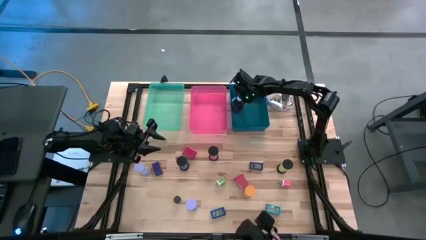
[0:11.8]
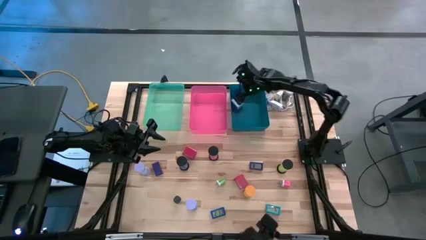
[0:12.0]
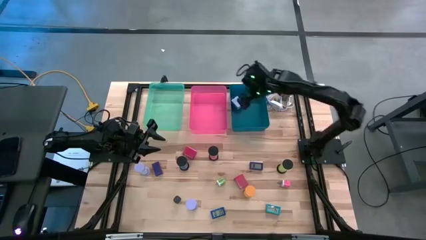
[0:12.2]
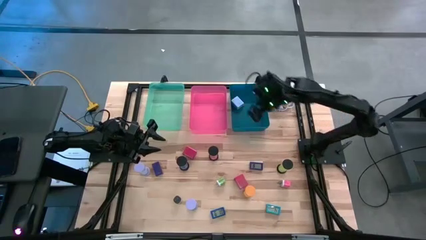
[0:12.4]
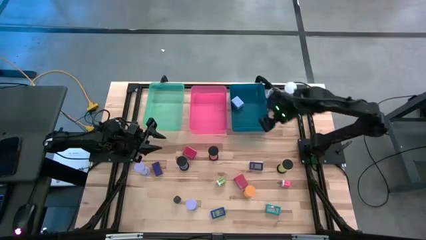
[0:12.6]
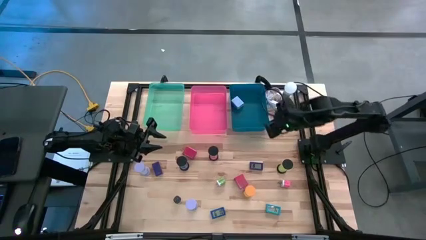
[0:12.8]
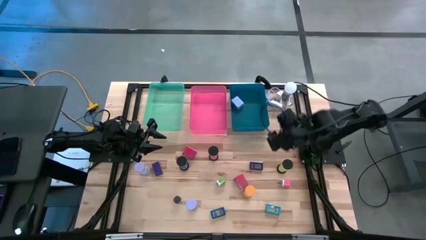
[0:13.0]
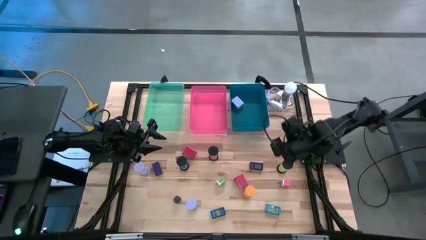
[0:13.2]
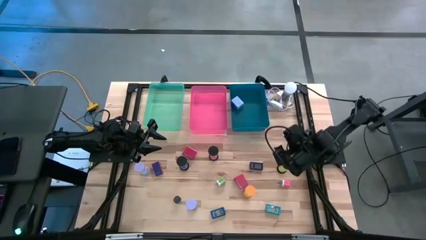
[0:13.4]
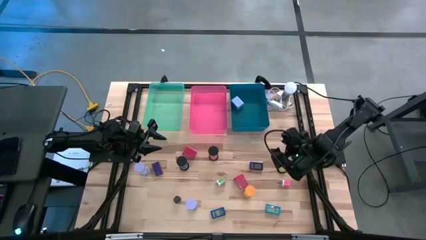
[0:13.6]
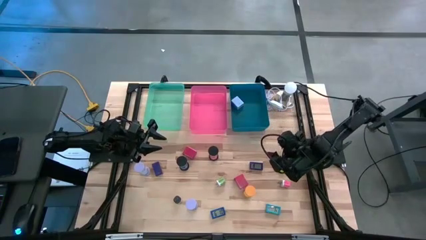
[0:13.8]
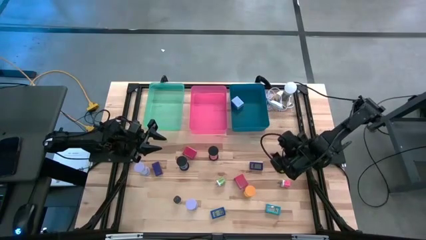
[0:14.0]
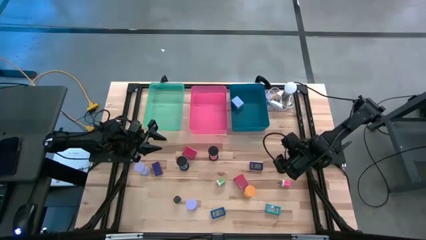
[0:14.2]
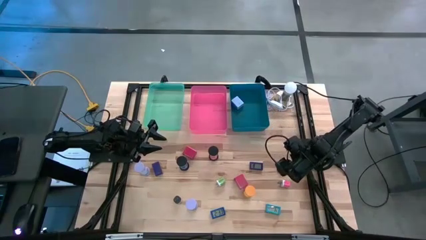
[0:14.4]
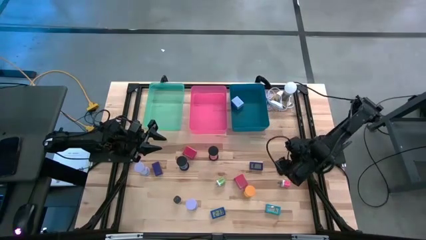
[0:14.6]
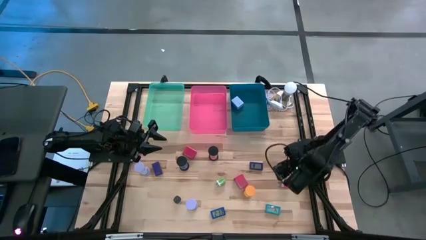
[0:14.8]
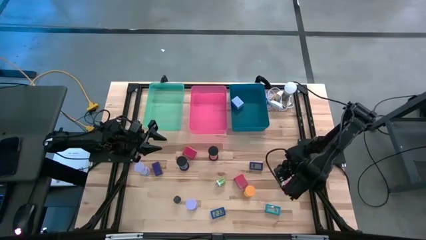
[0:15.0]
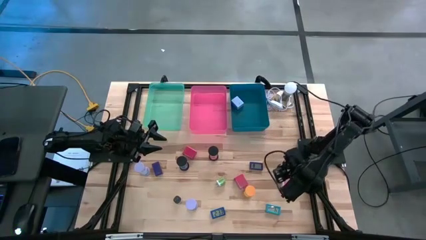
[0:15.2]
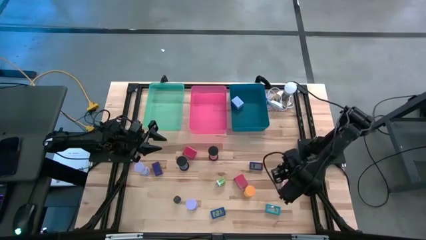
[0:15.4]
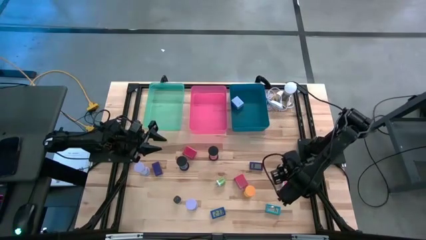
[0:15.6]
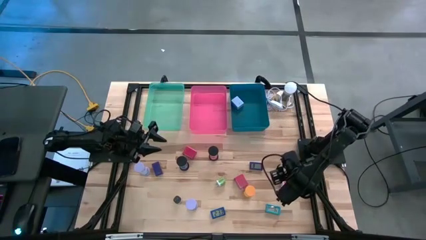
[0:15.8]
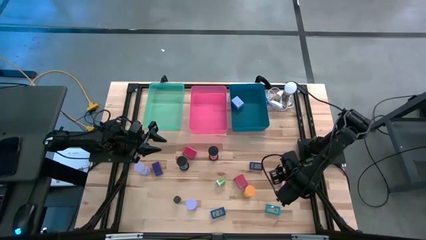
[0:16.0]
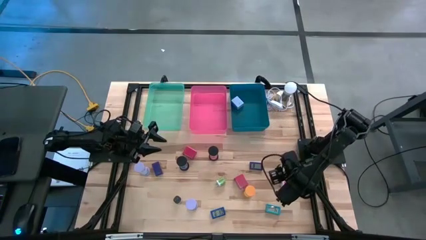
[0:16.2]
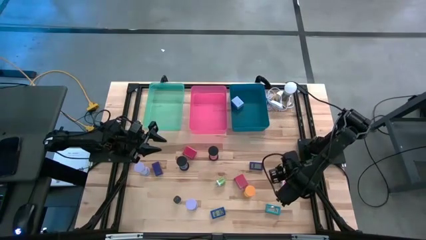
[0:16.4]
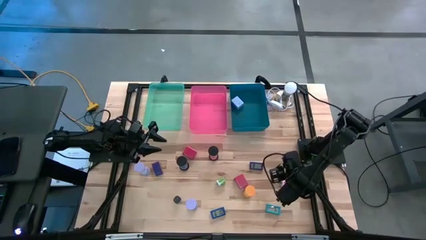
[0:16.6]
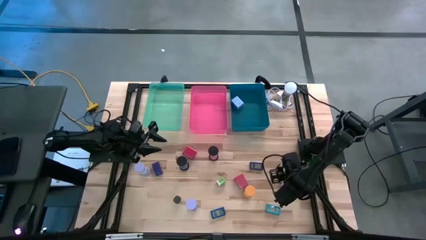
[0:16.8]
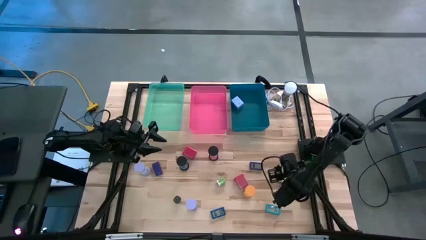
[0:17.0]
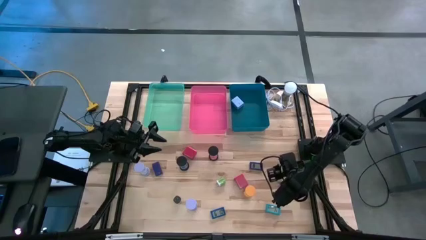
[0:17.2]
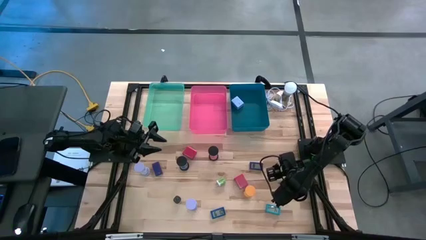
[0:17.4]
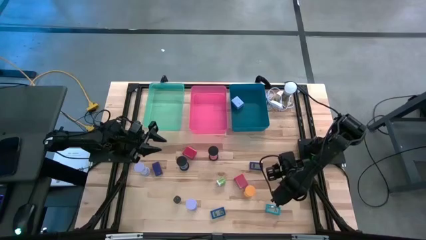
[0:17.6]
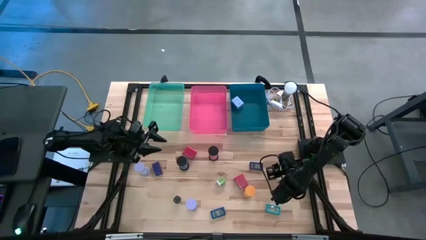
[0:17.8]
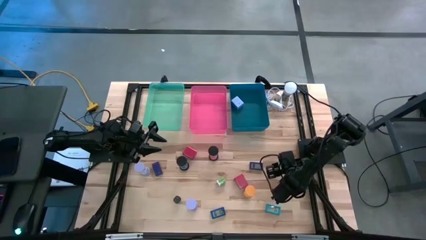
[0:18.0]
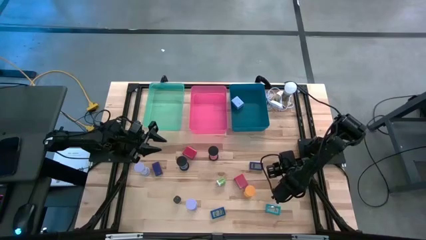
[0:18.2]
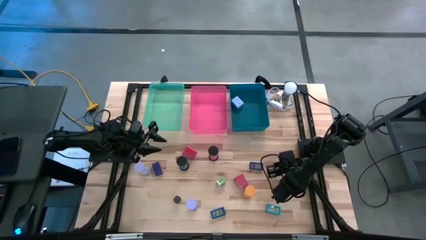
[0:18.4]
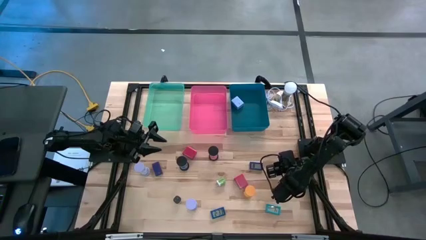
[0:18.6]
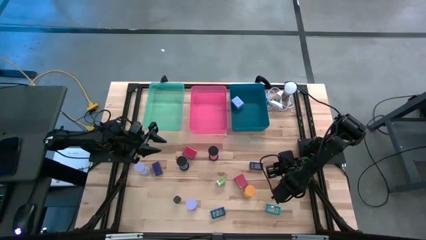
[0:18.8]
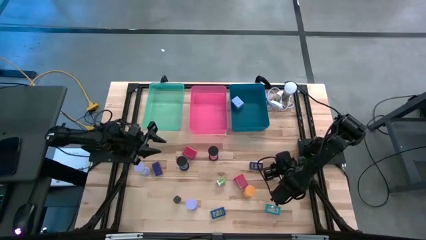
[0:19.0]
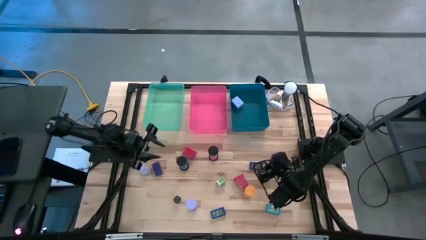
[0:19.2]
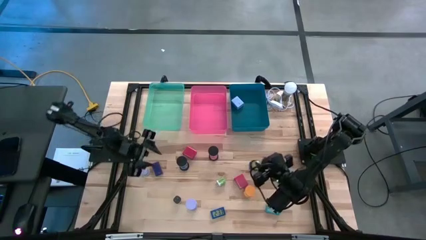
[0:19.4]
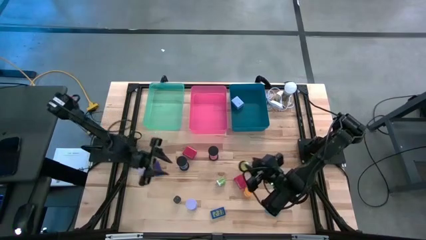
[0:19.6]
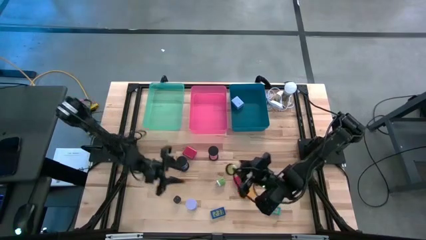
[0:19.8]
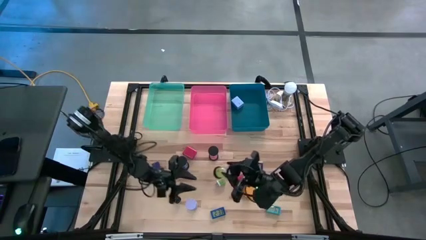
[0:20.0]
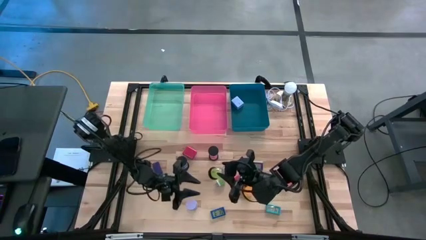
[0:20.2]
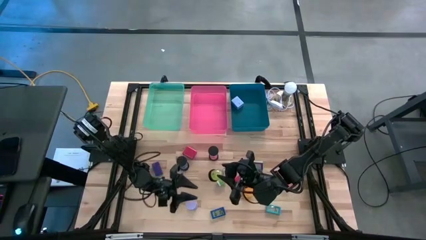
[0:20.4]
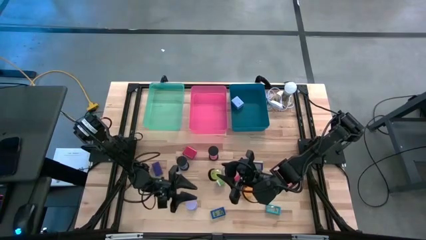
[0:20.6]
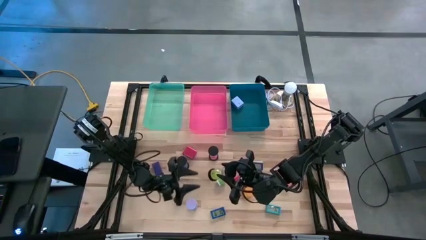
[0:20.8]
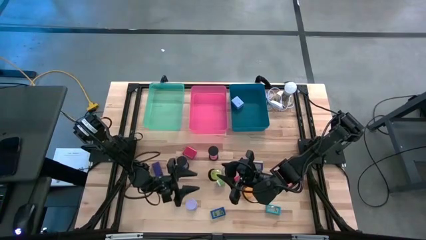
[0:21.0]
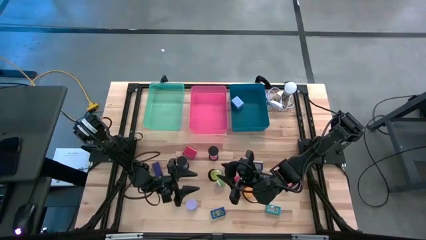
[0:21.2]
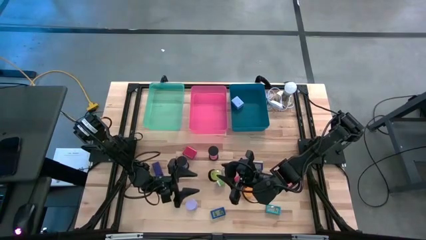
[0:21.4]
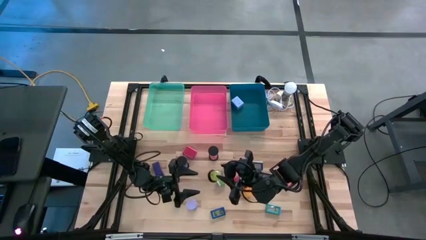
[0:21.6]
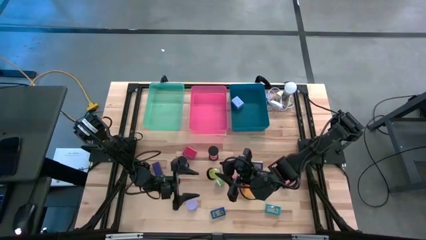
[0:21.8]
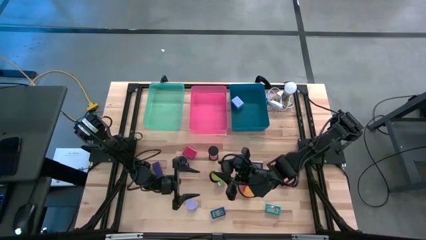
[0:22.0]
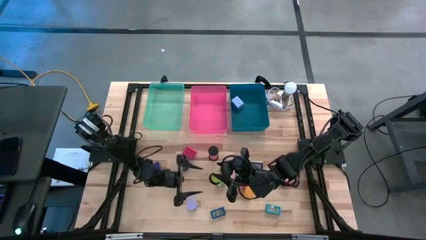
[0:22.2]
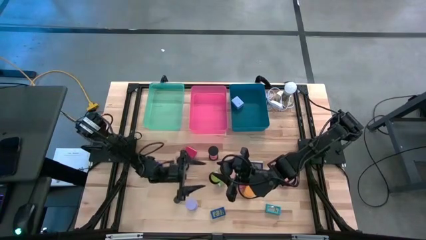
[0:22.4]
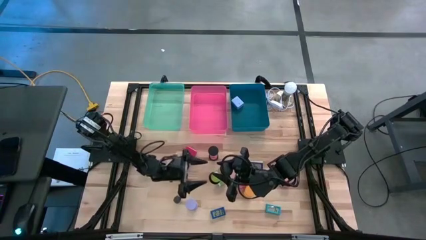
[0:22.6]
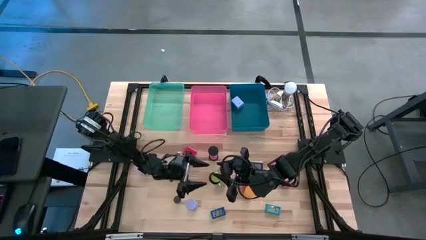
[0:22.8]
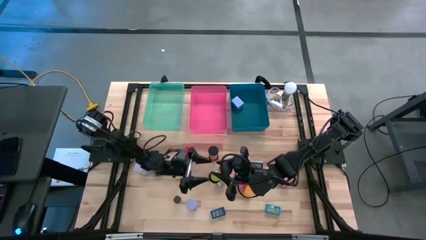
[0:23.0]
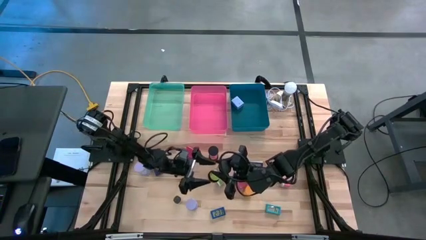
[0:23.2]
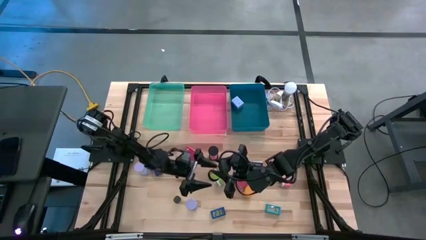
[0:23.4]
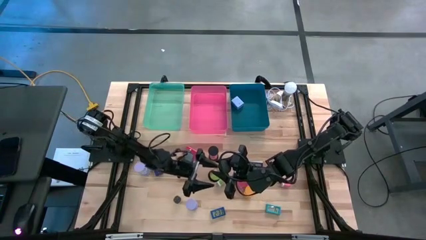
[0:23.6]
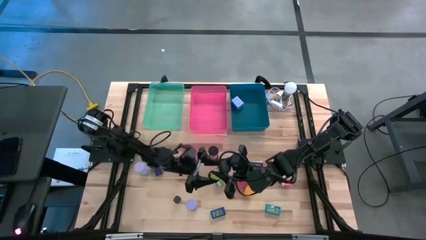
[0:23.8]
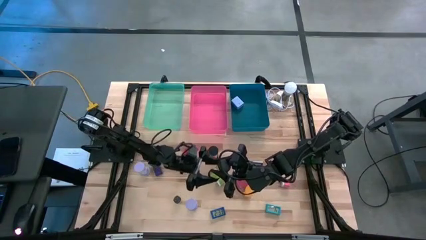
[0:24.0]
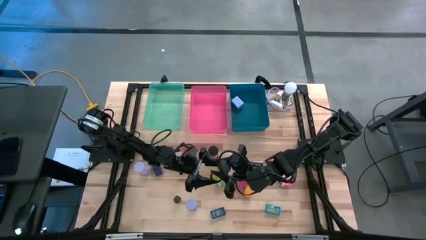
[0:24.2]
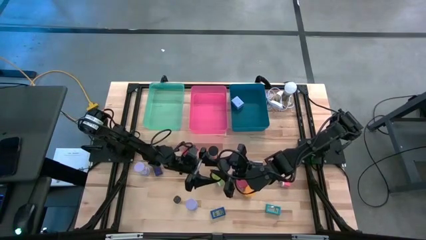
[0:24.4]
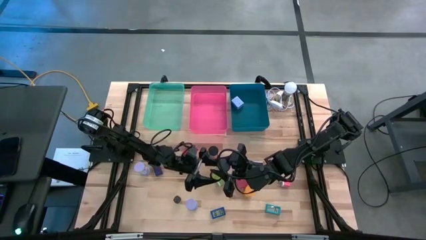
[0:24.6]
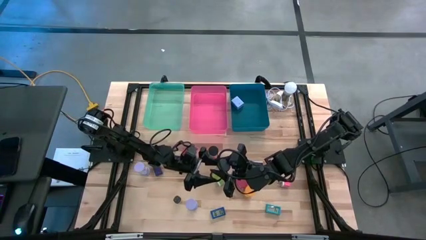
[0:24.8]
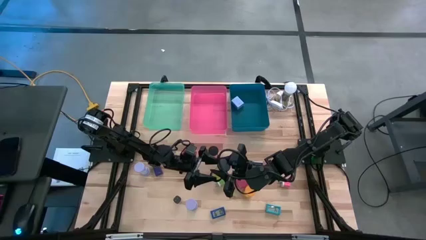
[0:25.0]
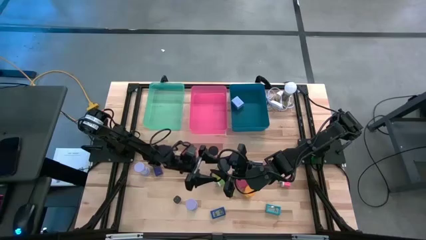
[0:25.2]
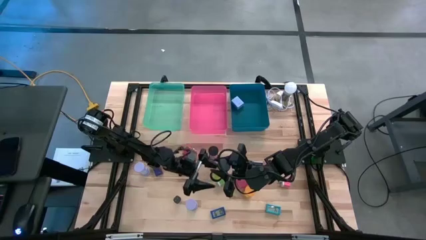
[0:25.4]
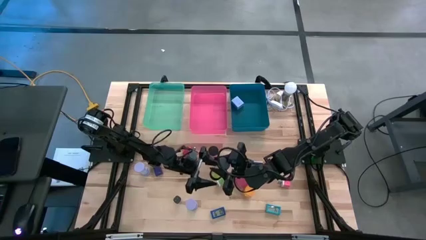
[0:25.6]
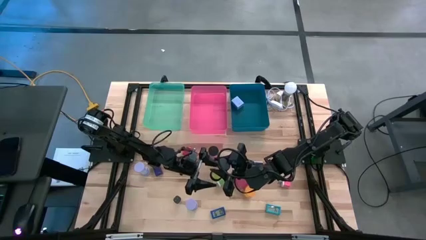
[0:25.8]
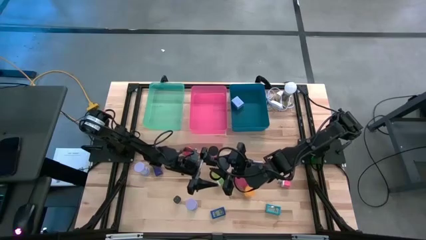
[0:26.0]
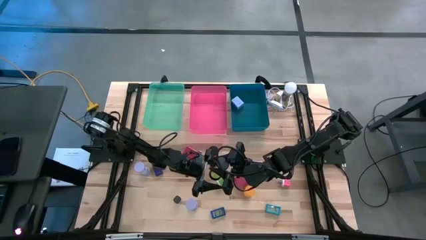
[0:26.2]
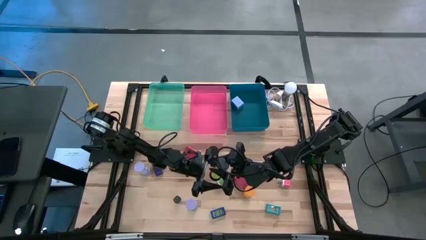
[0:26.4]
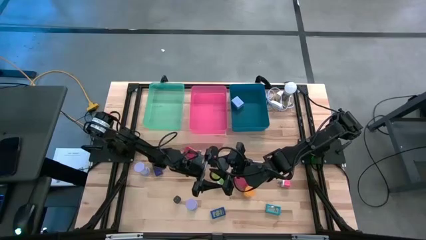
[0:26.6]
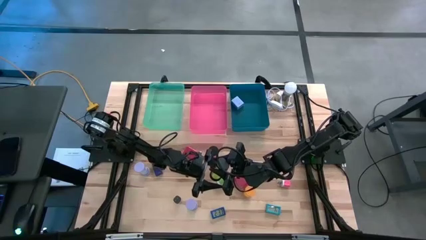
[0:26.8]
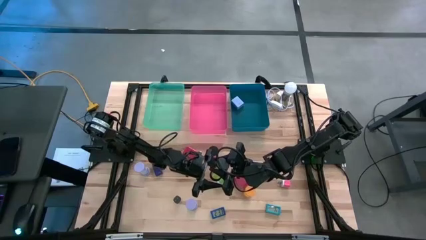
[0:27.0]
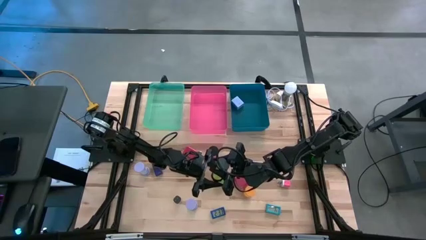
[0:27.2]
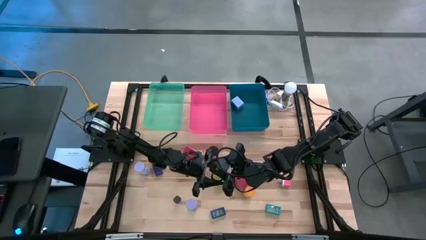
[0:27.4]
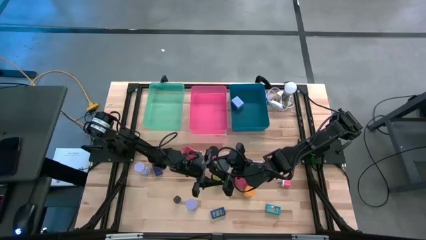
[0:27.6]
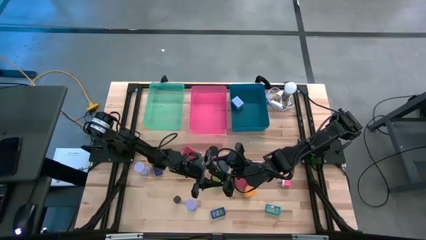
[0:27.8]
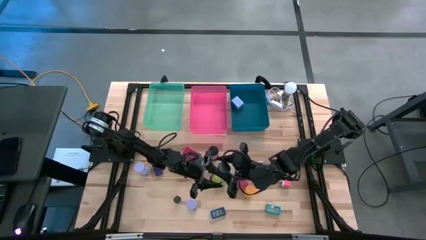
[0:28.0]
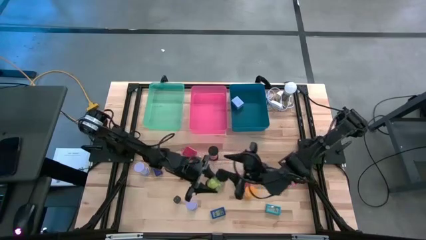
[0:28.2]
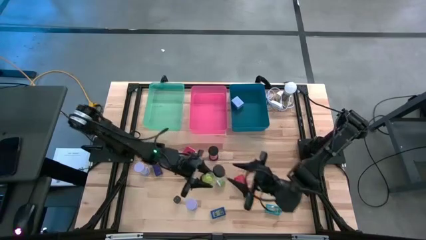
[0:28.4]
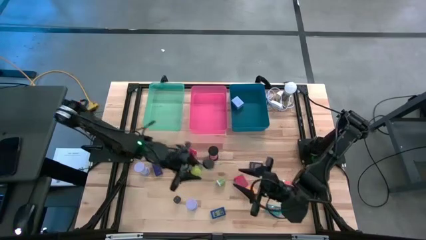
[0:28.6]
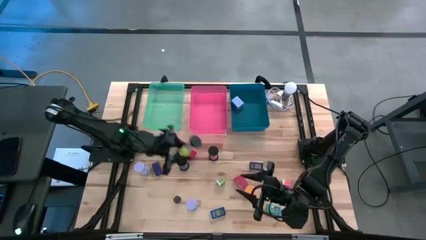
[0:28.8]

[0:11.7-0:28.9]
Task: Pick & Place Office items
Put the green hourglass into the green bin
